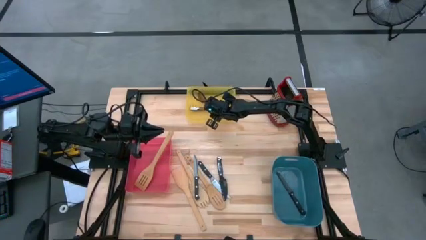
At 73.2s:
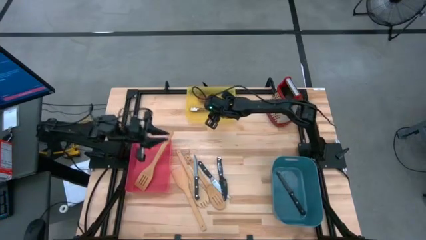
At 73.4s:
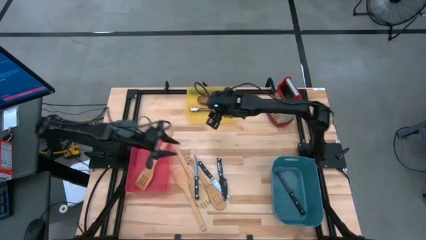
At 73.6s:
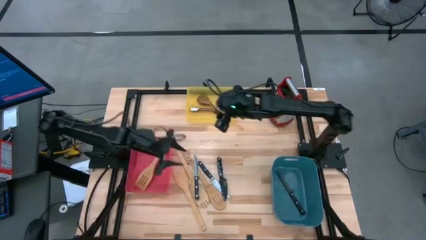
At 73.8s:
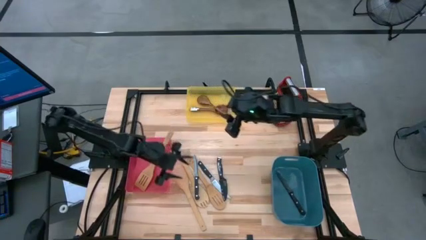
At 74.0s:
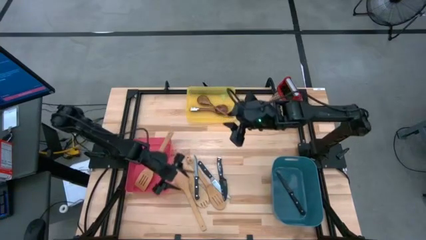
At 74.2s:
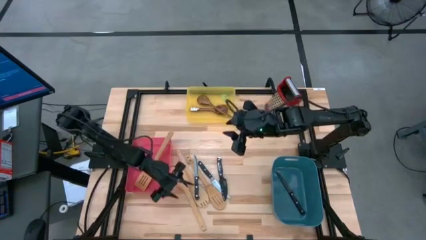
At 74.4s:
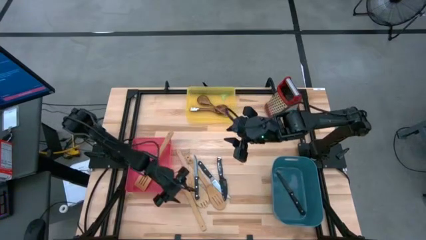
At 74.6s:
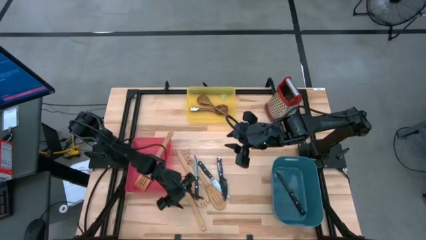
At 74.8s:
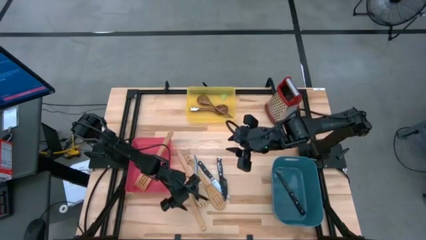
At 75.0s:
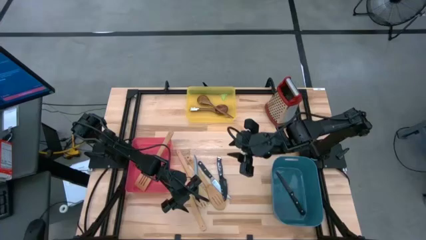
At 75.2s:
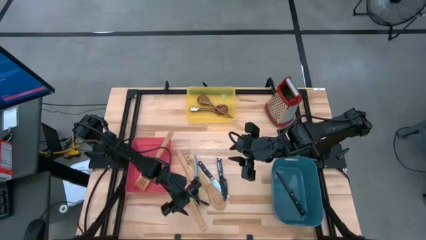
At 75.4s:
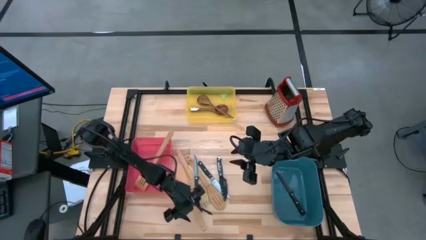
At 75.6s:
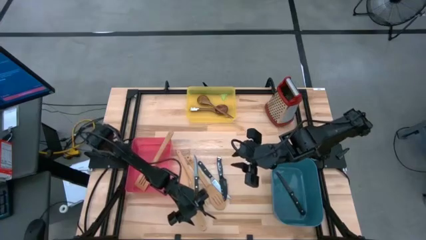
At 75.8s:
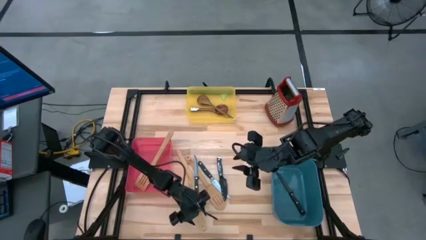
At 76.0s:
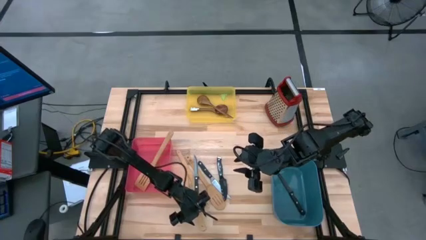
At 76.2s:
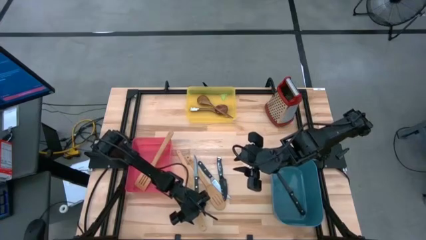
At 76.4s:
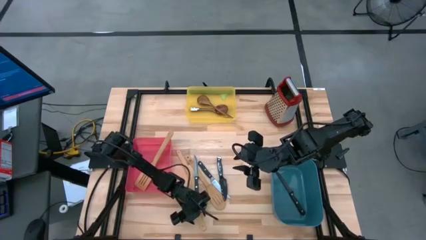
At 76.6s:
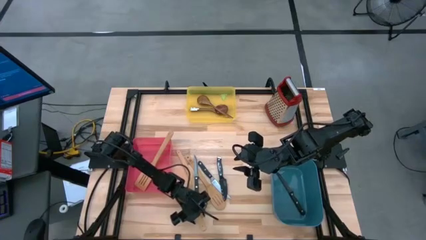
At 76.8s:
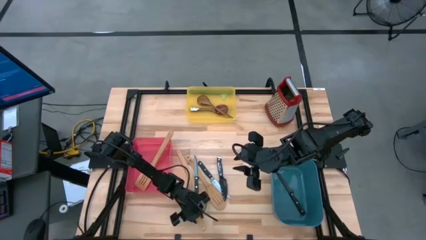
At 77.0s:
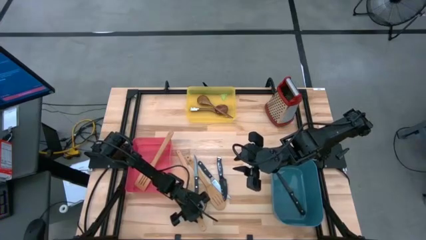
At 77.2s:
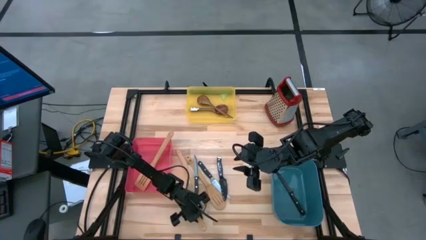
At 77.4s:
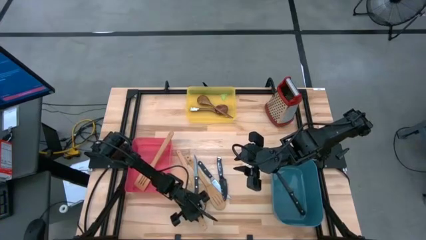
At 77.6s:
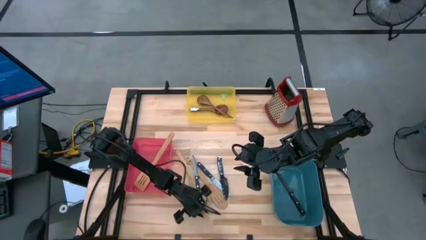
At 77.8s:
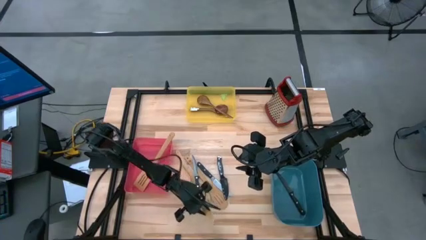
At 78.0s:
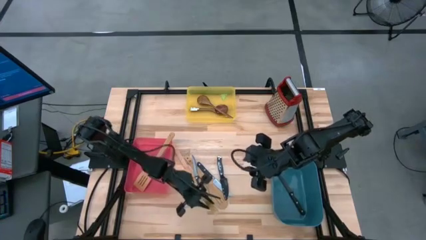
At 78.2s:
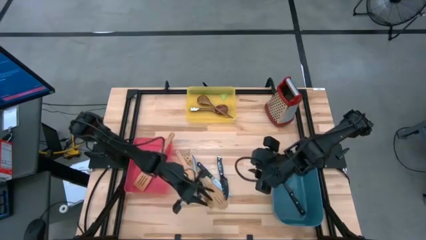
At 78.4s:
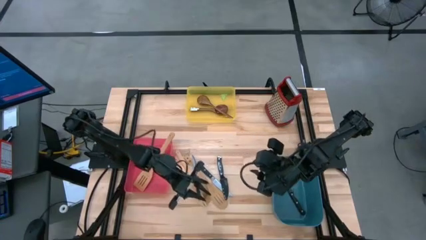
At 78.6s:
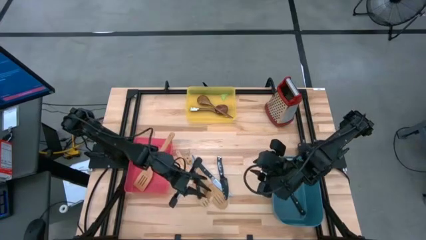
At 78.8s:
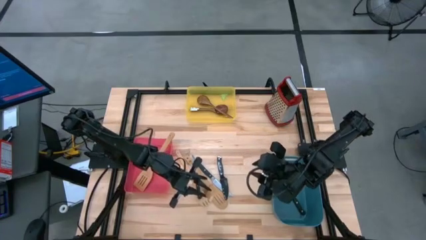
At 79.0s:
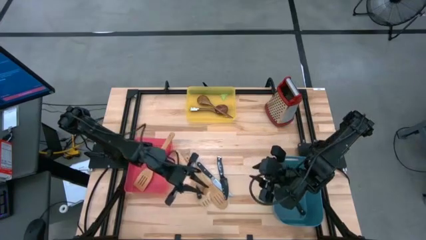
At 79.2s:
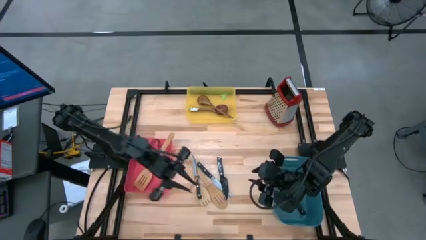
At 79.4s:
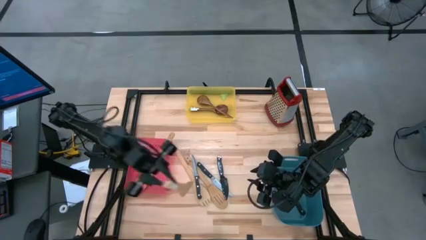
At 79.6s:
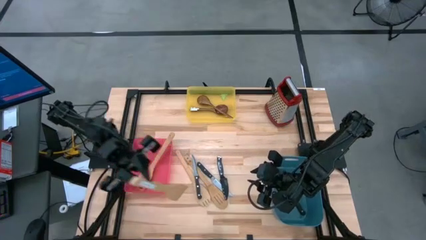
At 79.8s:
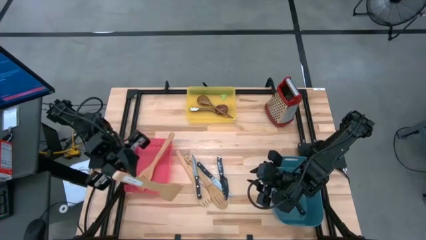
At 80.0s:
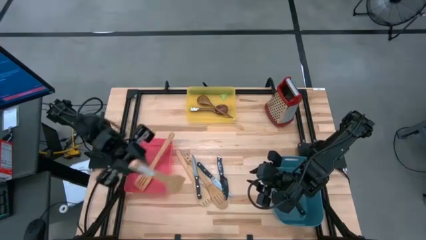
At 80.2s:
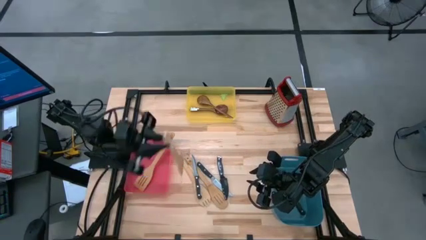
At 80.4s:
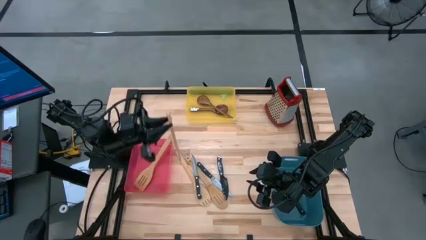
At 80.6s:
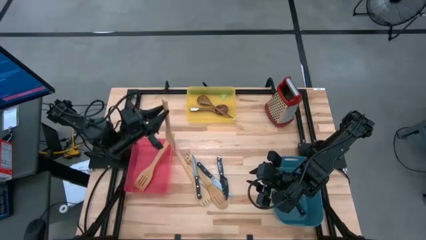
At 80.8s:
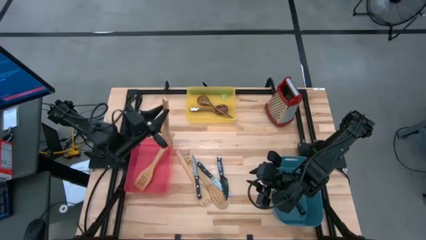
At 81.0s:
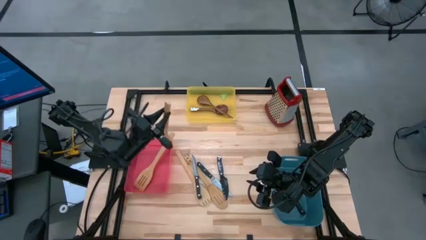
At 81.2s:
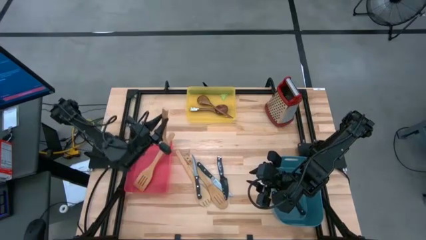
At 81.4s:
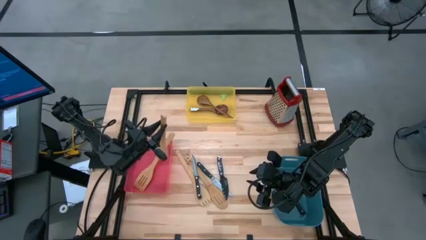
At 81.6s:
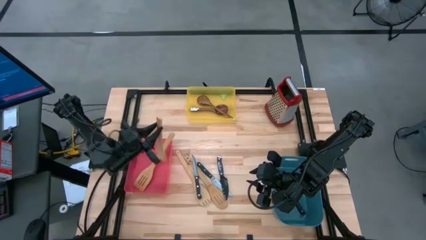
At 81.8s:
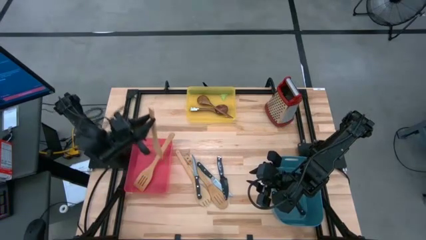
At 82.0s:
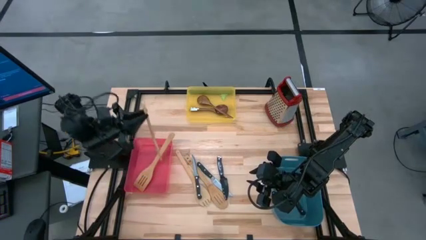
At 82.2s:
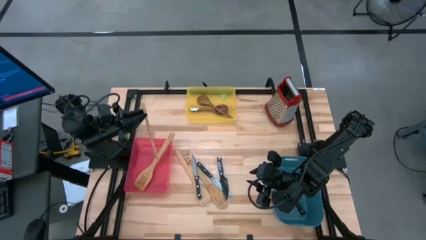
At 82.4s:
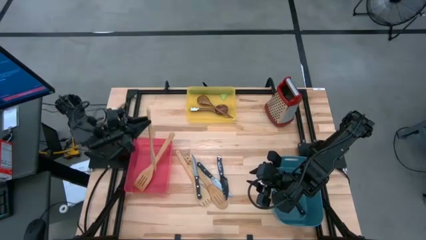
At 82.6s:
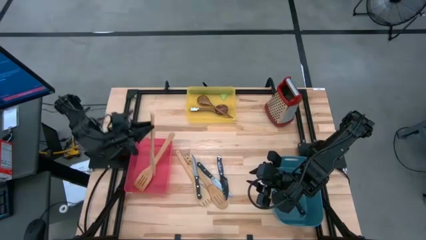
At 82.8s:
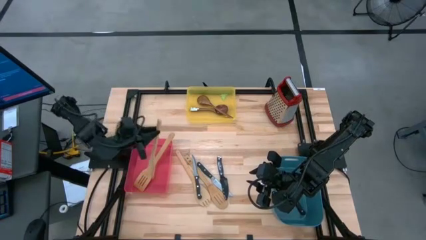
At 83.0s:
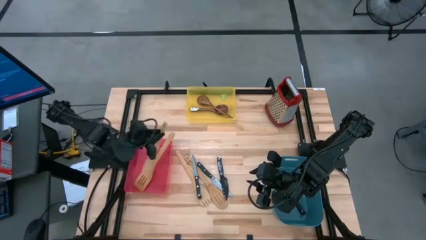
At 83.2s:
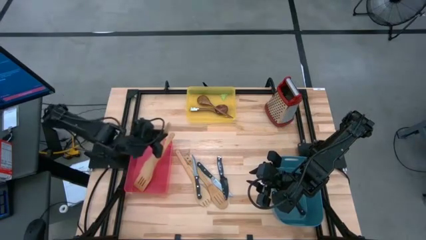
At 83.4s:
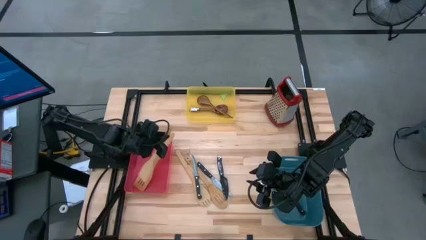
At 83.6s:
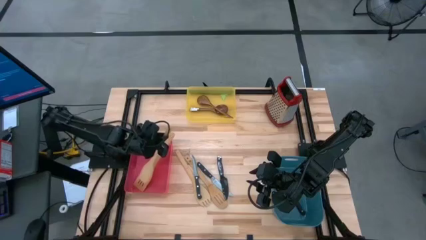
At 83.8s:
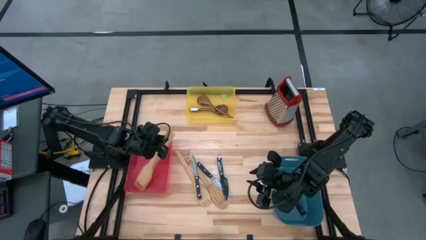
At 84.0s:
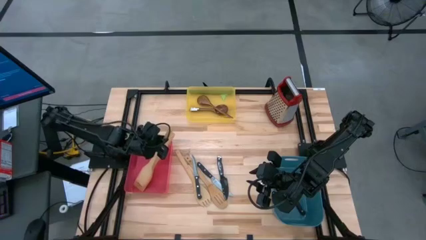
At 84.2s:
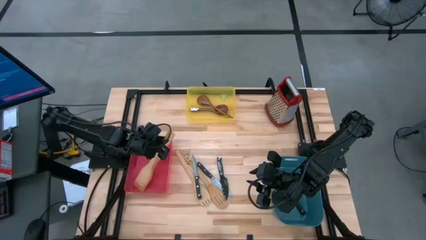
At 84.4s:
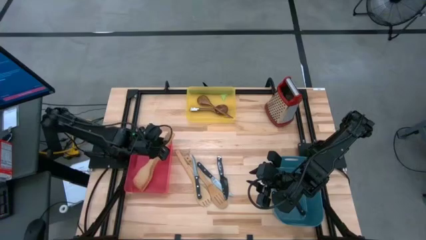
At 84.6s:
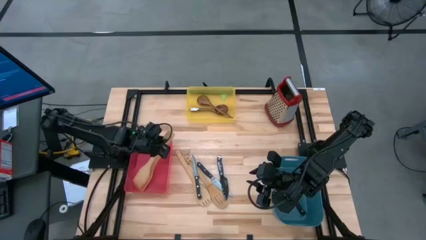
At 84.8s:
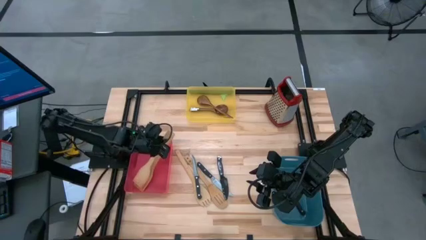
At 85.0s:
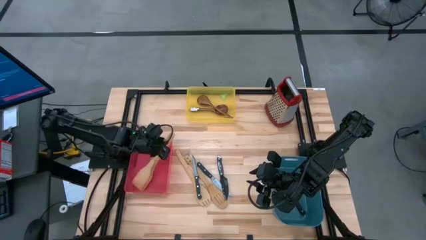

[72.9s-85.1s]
Task: Pick & Place Kitchen Items
Put the brown spatula into the red bin

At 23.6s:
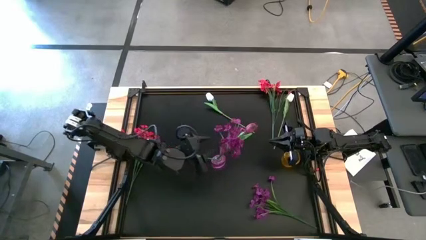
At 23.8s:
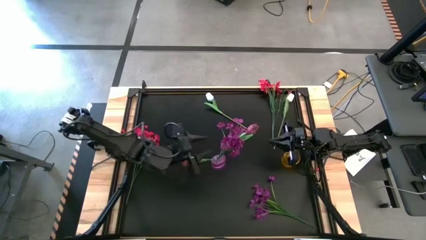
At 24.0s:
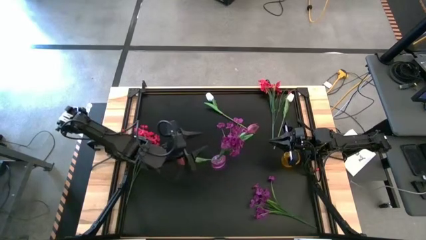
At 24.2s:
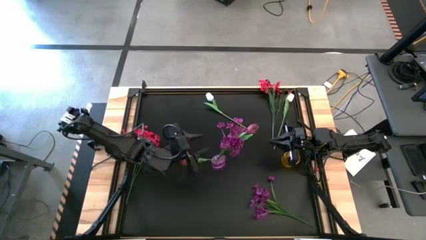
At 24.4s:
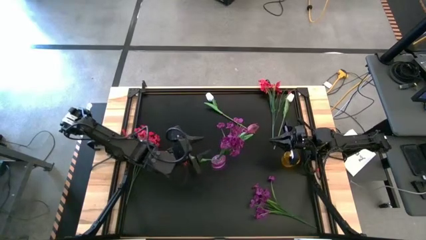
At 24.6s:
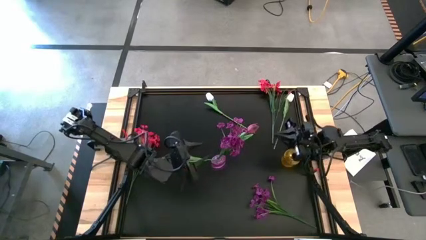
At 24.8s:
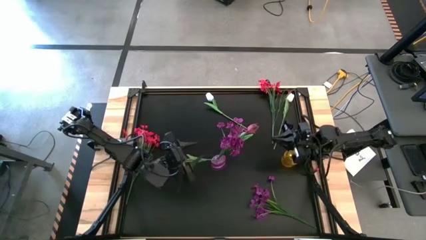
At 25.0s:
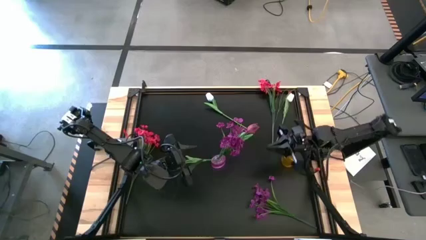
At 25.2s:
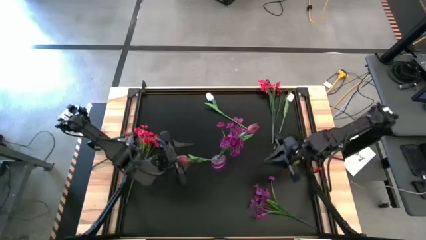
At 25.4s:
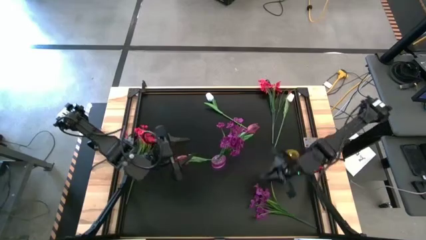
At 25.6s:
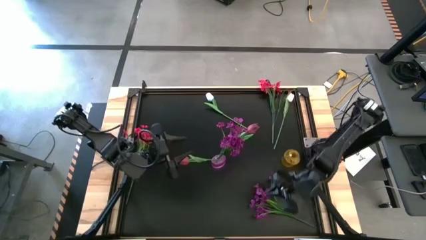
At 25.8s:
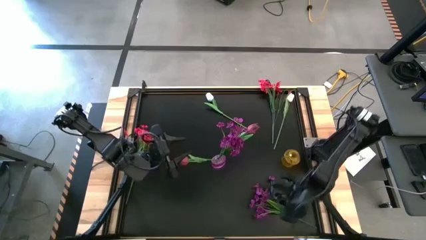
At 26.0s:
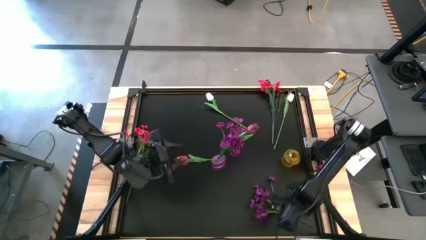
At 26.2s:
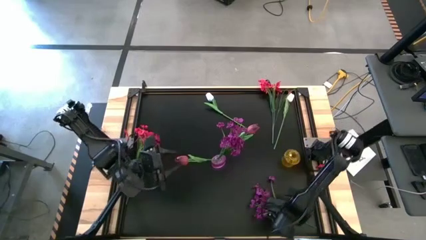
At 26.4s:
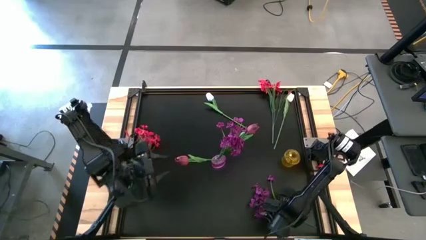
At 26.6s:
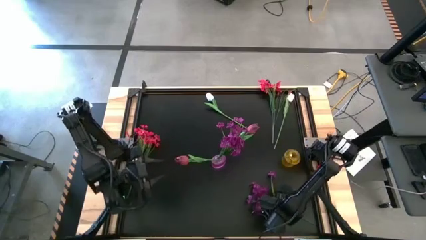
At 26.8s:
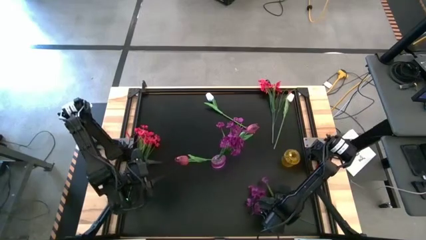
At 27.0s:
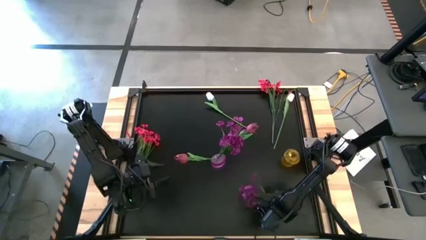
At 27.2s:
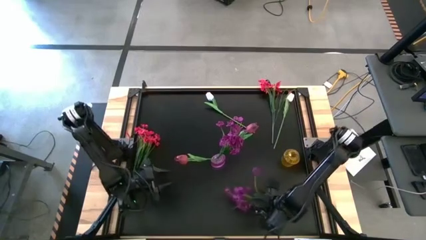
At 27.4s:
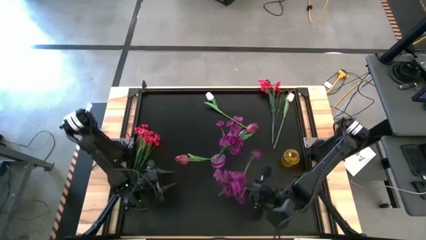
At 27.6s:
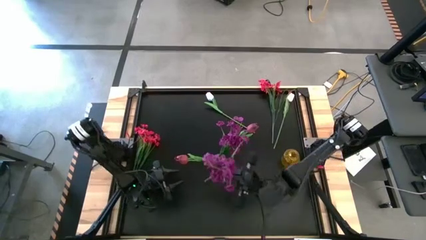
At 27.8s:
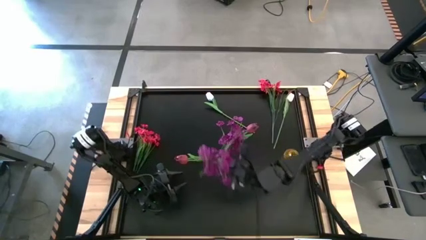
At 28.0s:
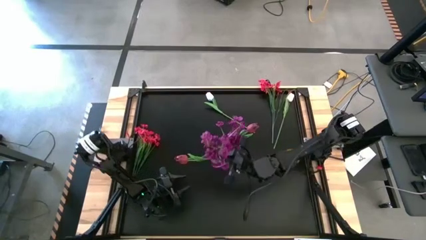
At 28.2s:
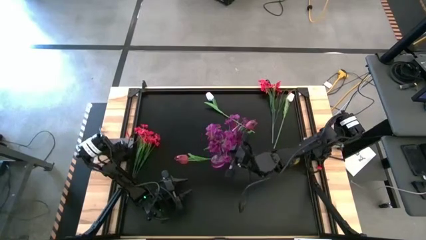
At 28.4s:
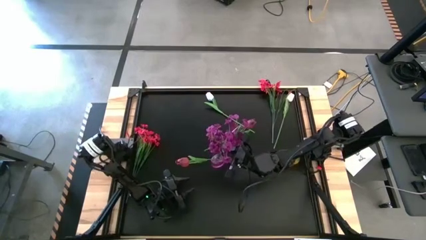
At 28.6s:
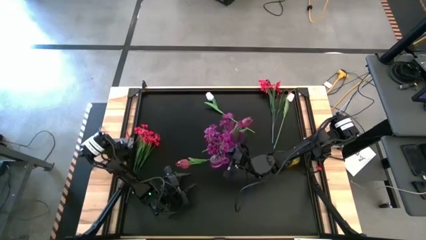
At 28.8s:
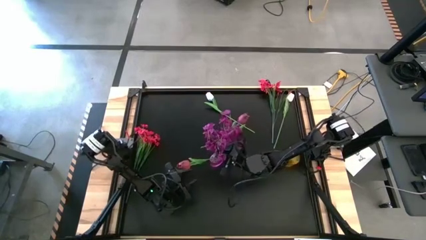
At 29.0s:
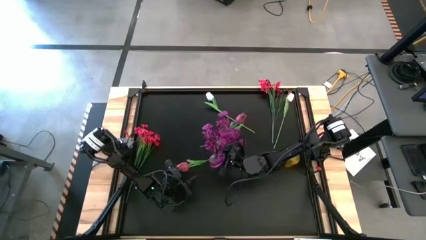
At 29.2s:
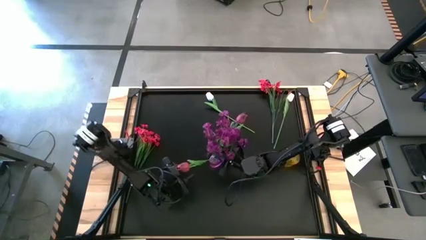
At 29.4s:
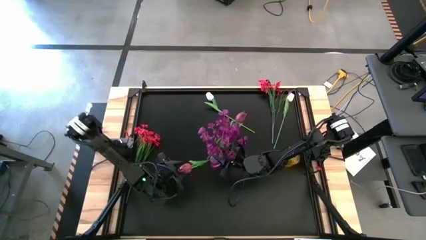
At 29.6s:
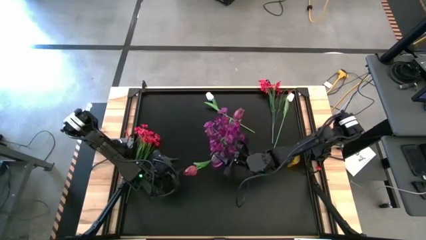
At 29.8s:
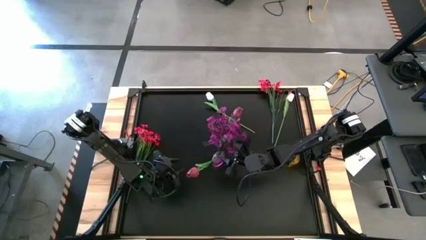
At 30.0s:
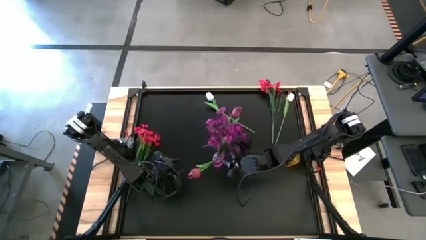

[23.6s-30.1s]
Task: Sort flowers into vase by color
Put the violet flowers into the violet vase
